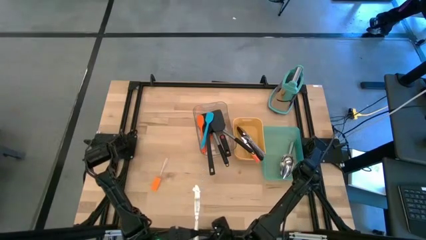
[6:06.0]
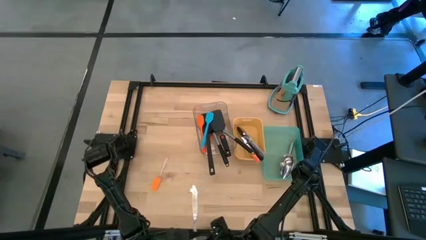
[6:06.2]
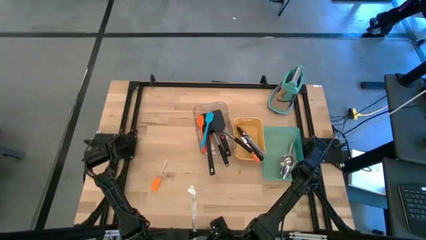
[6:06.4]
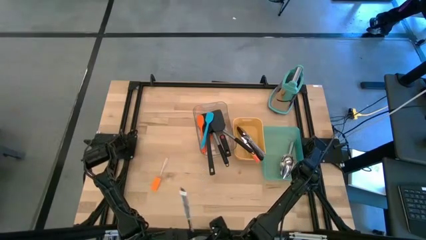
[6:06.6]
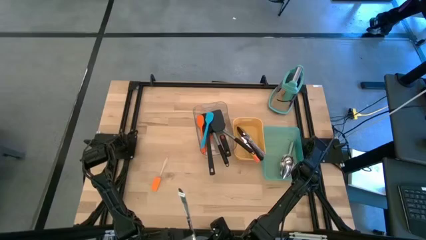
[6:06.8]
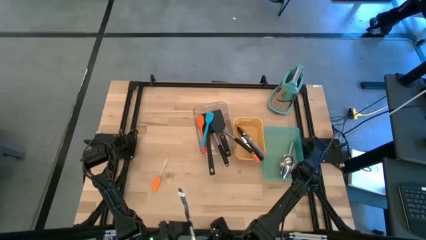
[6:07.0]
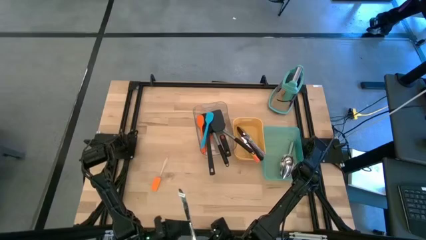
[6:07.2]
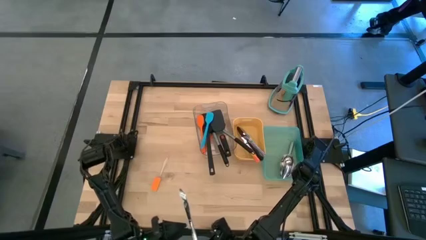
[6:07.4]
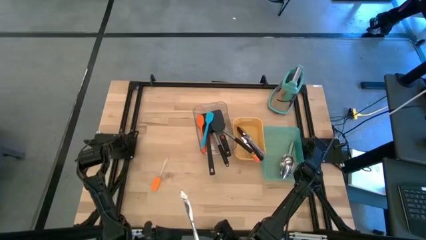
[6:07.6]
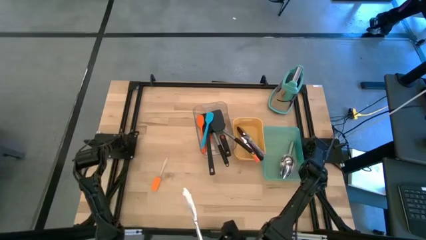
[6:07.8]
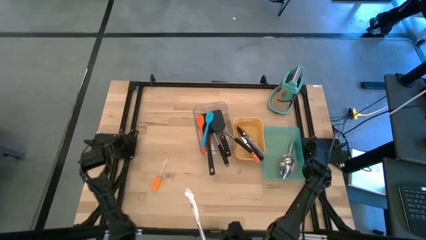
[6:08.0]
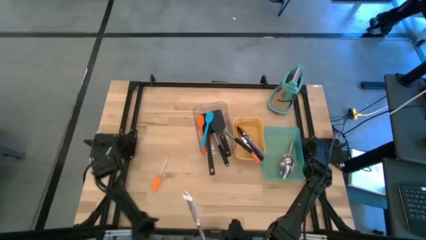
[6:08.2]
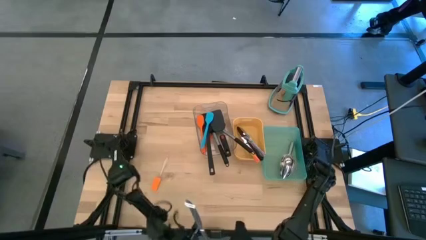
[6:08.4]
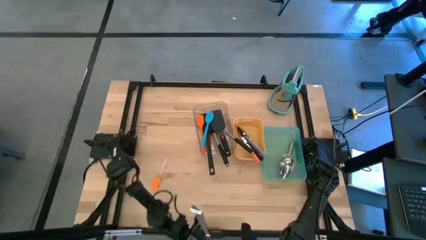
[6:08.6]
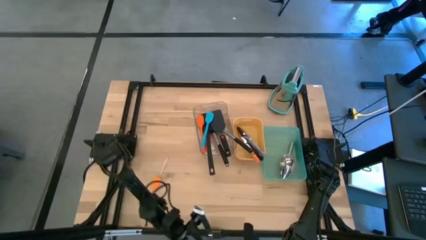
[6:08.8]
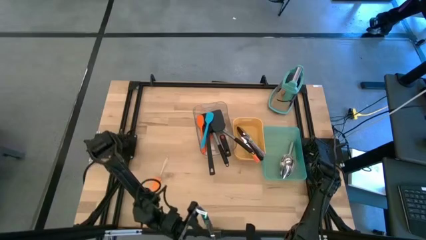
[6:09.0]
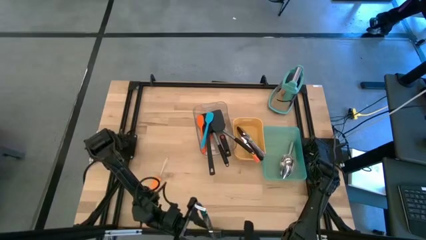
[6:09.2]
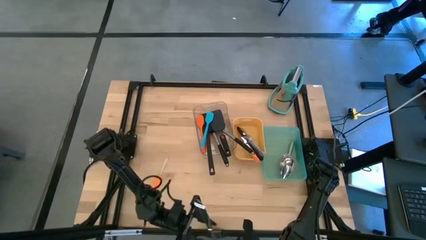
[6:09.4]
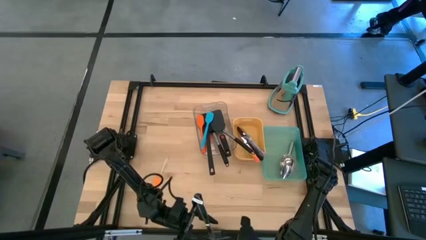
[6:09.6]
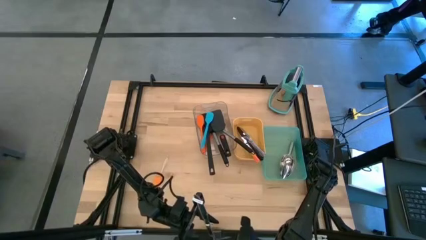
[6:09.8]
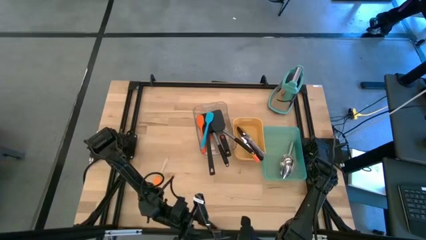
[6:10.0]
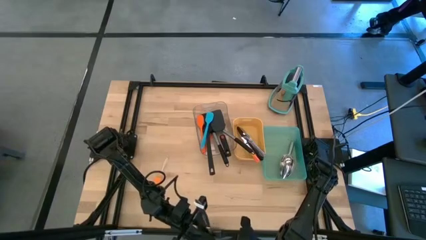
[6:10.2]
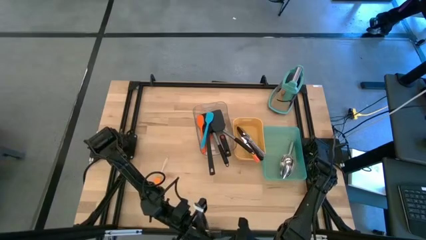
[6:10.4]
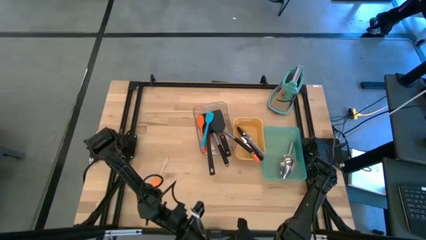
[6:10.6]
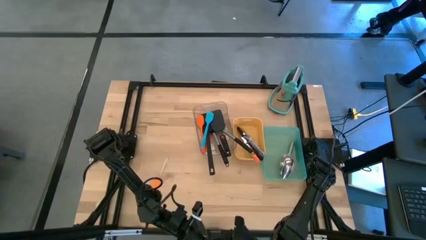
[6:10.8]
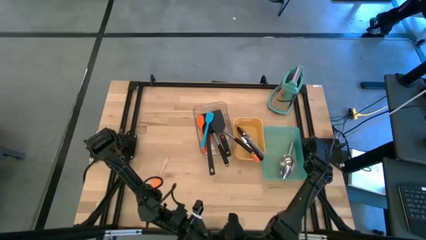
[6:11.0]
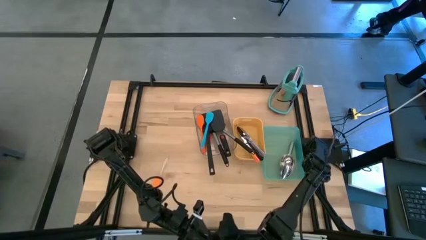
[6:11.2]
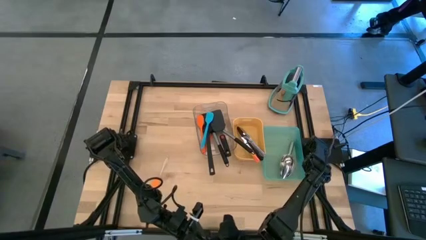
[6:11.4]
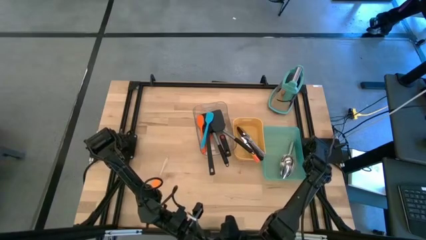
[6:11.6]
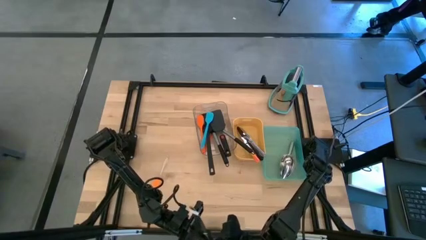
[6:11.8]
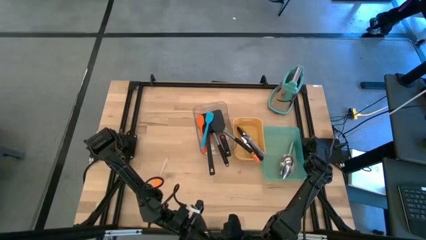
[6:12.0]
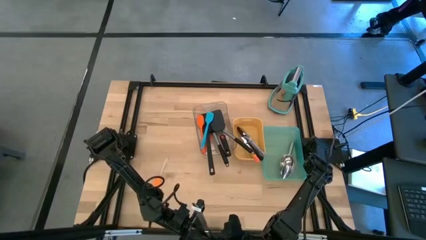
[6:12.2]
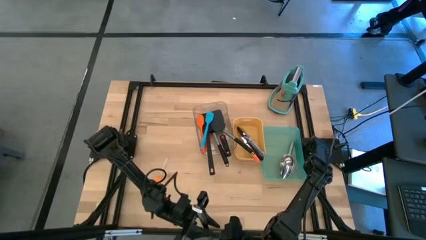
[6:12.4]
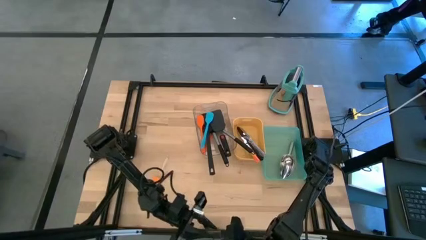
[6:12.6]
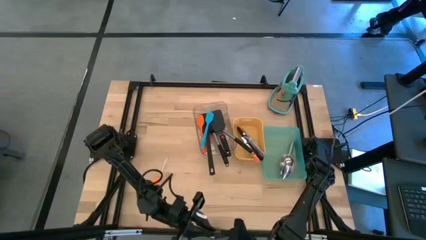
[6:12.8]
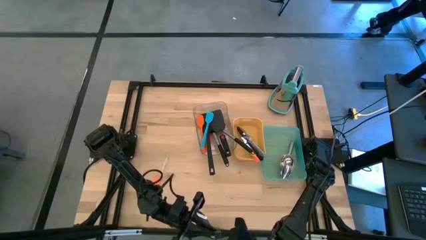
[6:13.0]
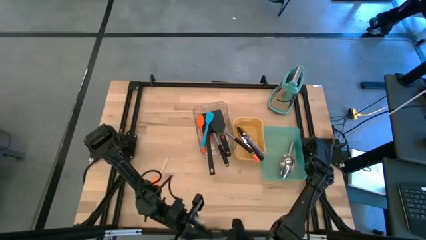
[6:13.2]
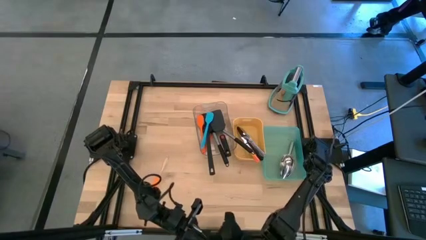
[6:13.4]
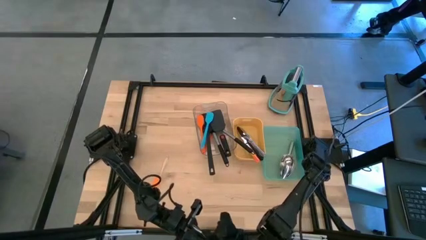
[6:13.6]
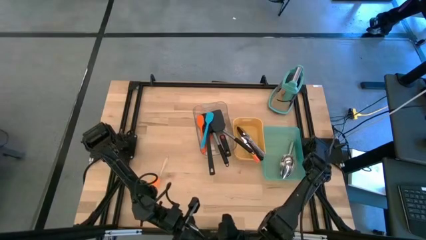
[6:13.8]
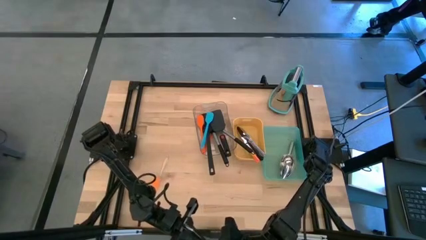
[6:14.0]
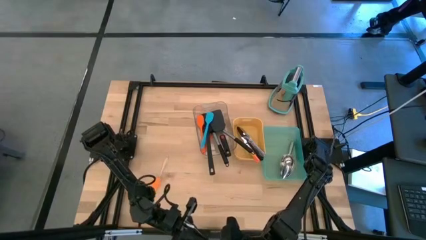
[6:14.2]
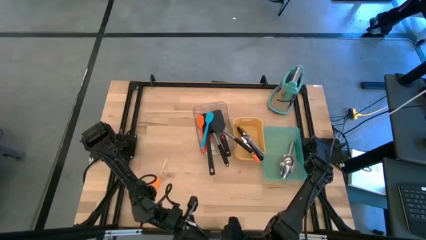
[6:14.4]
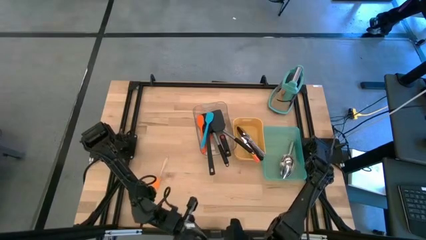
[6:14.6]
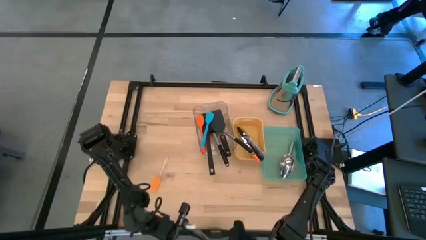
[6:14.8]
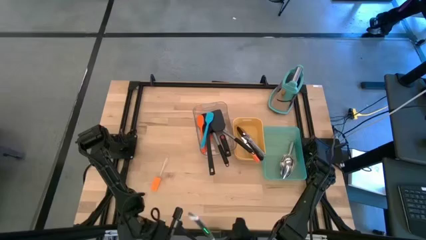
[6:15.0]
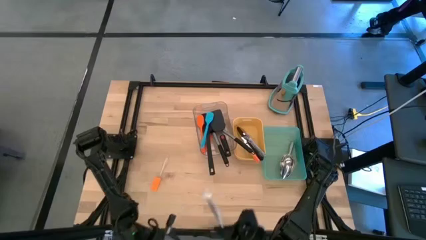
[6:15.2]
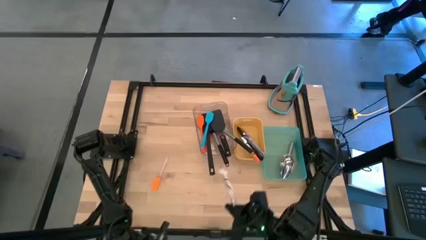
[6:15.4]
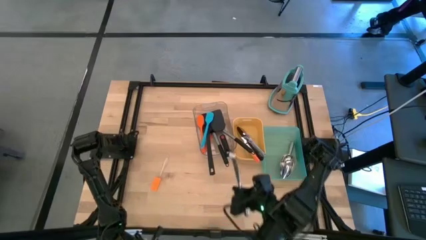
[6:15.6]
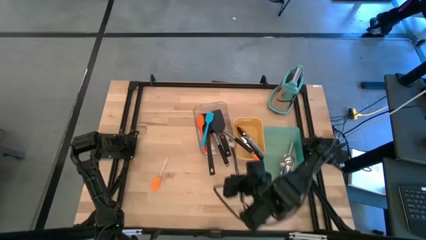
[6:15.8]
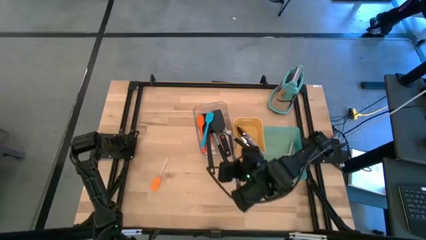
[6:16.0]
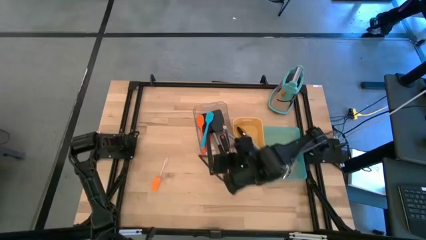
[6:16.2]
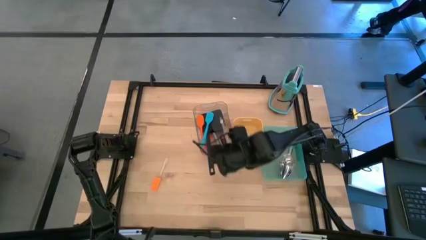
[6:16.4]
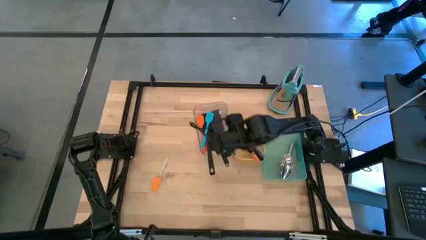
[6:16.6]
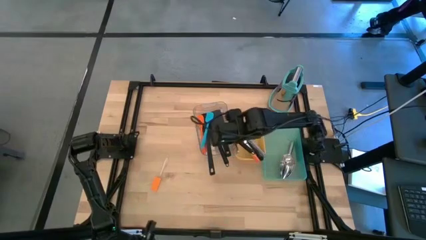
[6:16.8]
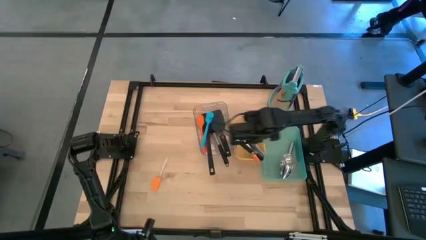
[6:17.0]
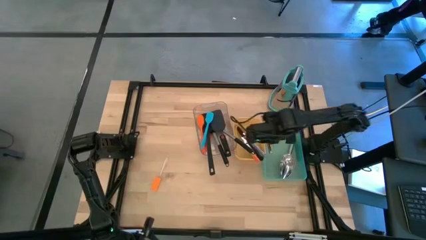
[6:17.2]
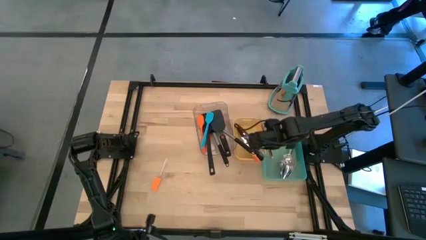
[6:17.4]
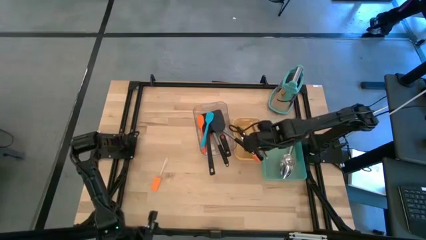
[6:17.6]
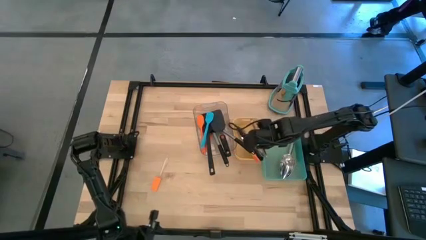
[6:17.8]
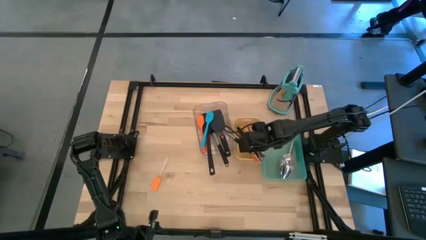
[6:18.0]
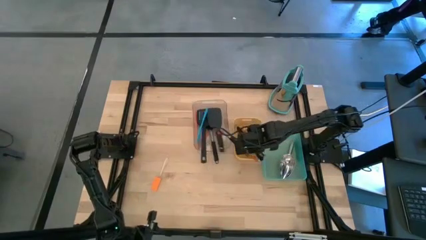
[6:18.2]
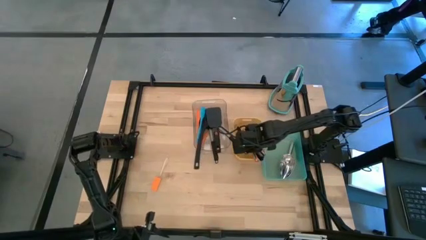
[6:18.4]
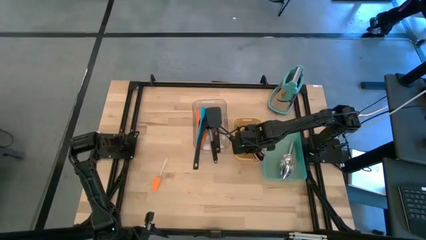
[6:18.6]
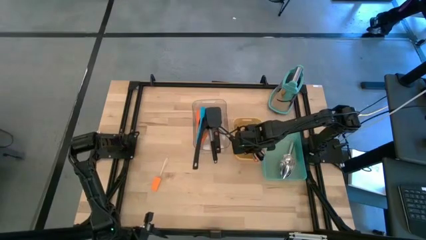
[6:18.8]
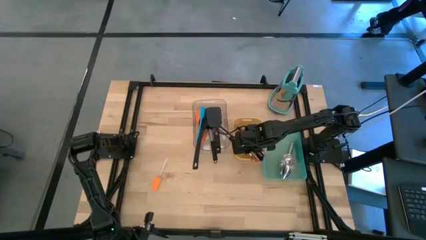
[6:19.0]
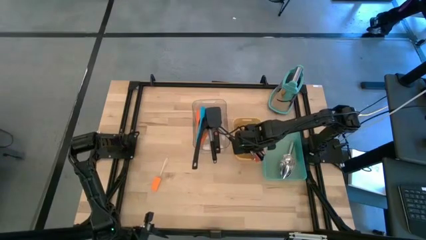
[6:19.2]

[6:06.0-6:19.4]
Task: Pick & Place Kitchen Items
Put the silver table knife into the yellow bin
